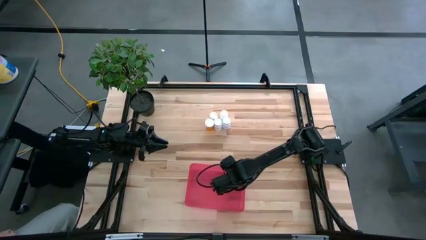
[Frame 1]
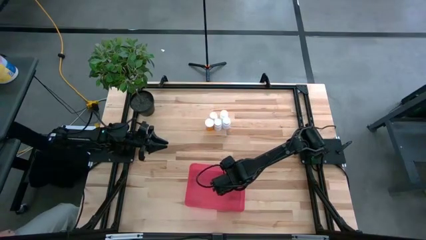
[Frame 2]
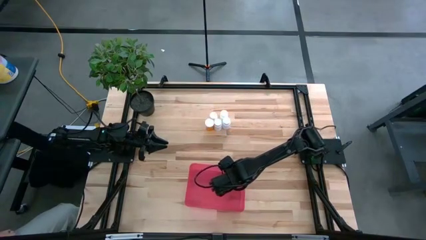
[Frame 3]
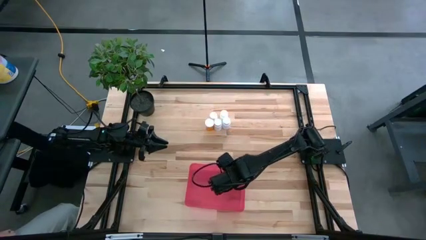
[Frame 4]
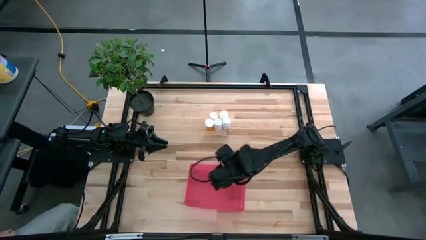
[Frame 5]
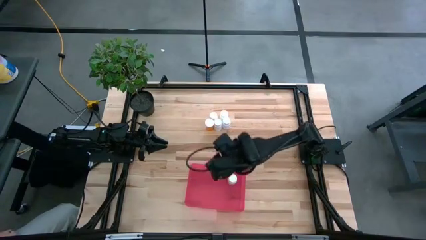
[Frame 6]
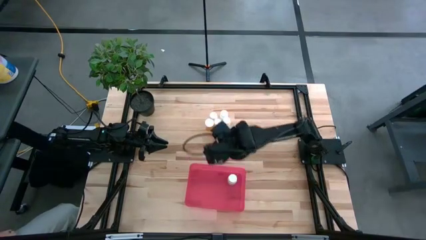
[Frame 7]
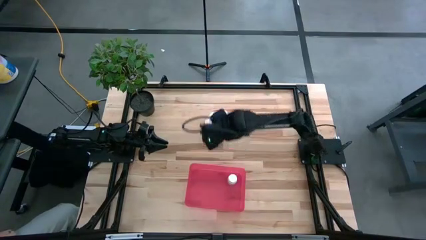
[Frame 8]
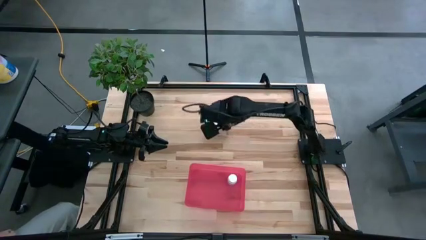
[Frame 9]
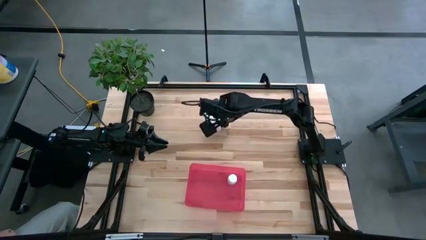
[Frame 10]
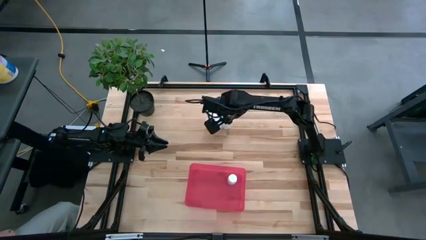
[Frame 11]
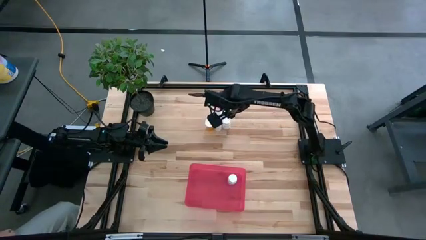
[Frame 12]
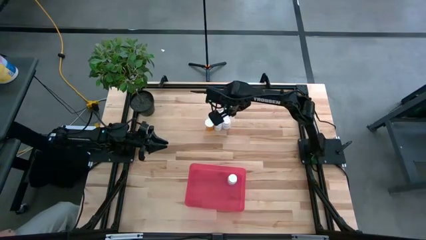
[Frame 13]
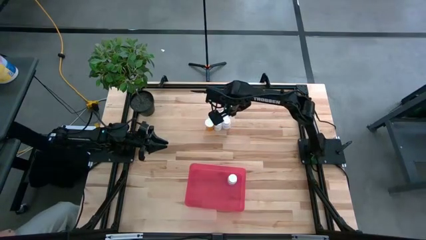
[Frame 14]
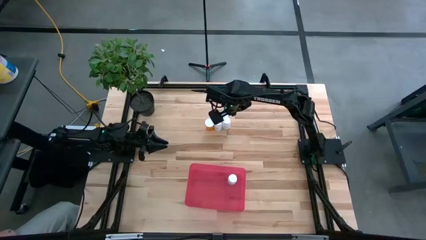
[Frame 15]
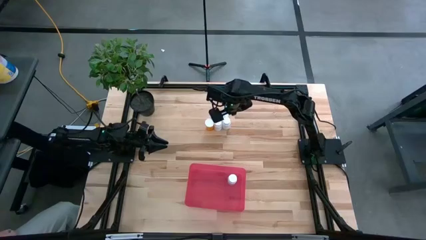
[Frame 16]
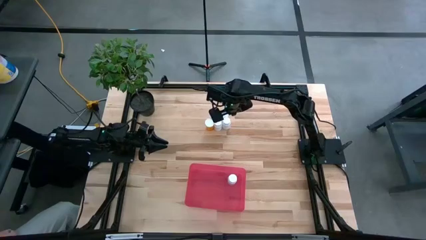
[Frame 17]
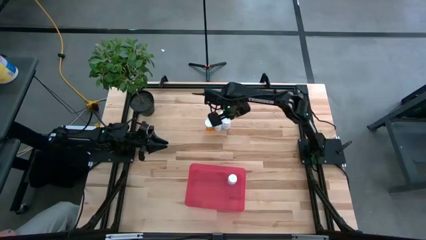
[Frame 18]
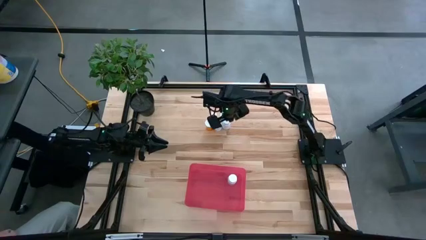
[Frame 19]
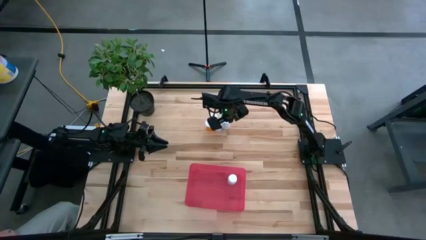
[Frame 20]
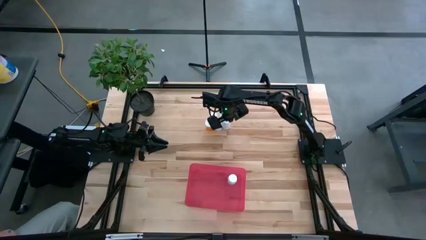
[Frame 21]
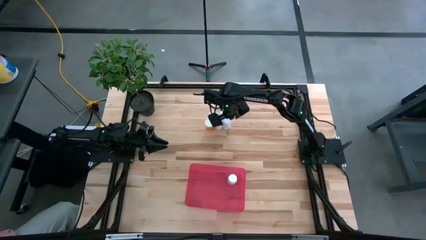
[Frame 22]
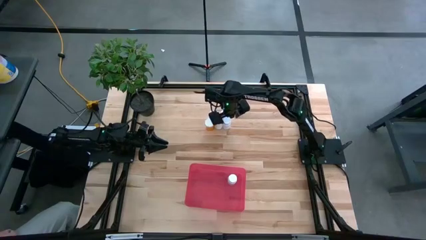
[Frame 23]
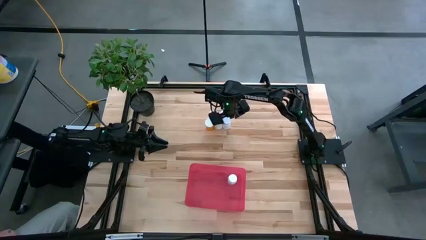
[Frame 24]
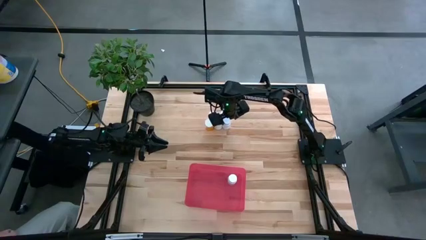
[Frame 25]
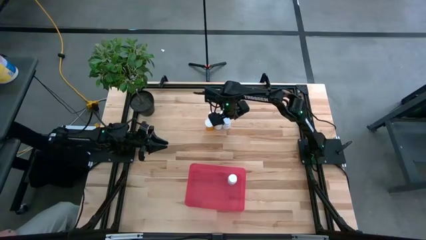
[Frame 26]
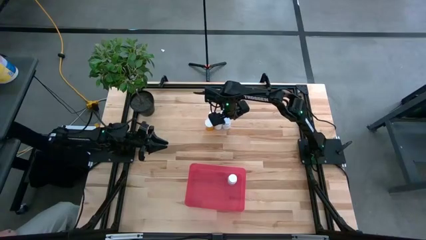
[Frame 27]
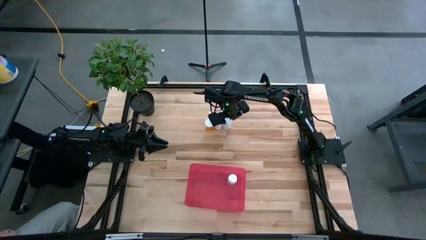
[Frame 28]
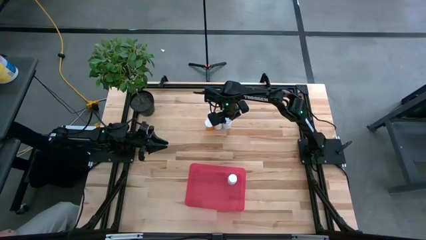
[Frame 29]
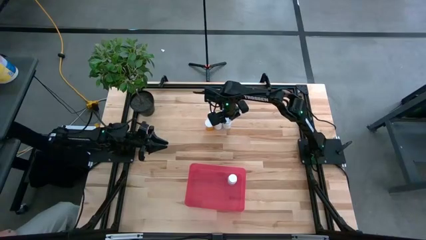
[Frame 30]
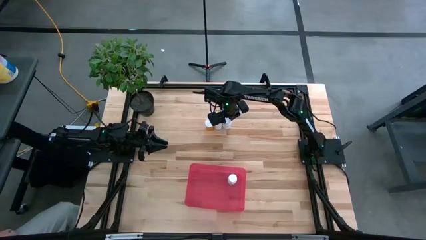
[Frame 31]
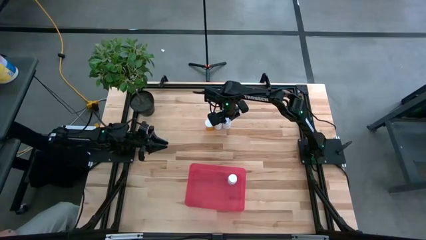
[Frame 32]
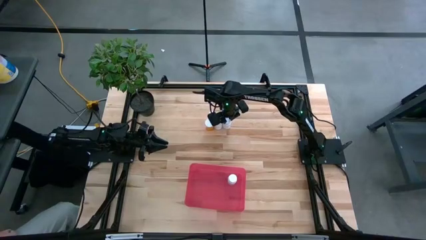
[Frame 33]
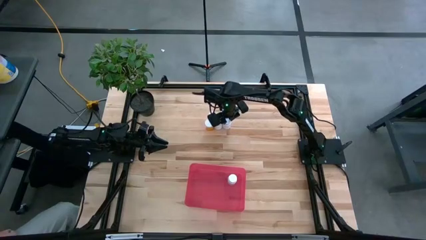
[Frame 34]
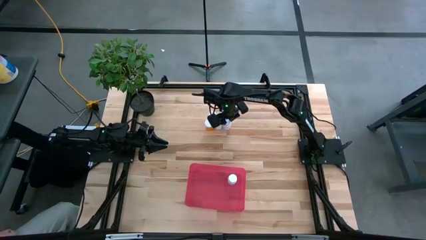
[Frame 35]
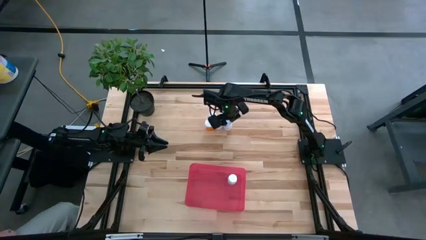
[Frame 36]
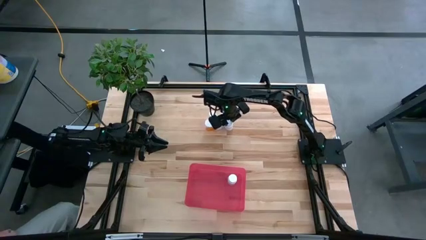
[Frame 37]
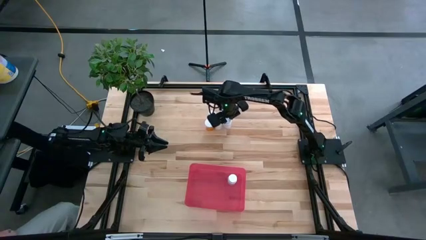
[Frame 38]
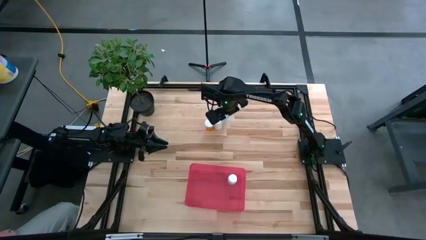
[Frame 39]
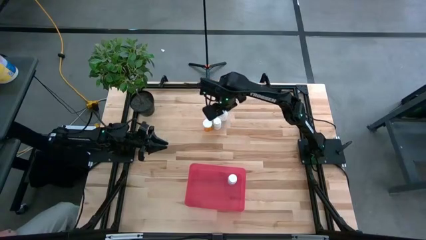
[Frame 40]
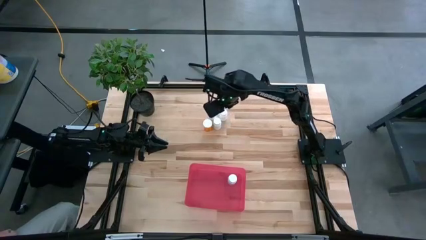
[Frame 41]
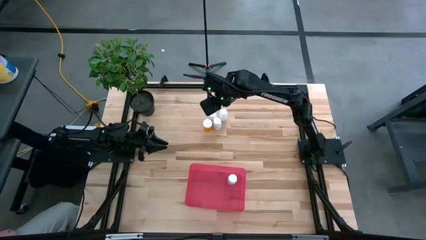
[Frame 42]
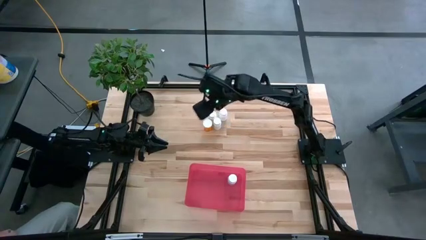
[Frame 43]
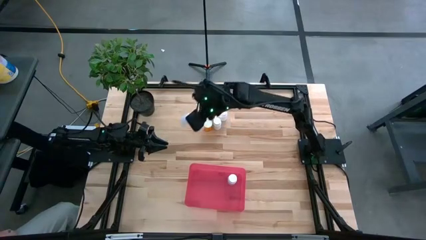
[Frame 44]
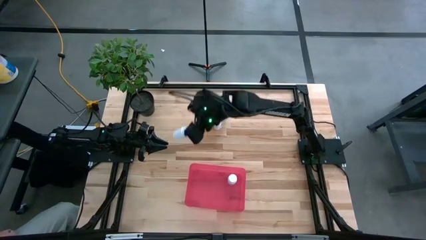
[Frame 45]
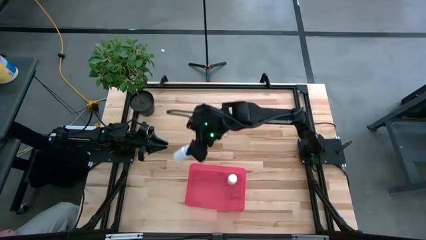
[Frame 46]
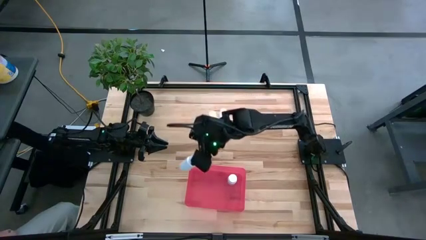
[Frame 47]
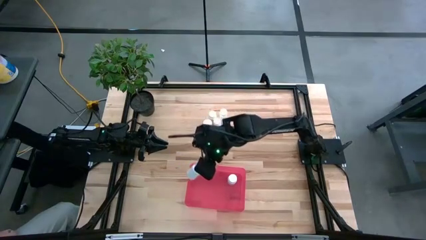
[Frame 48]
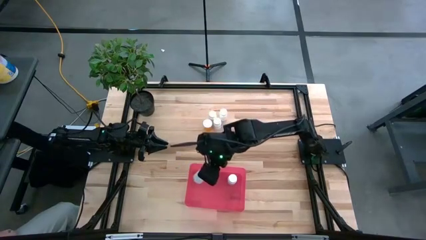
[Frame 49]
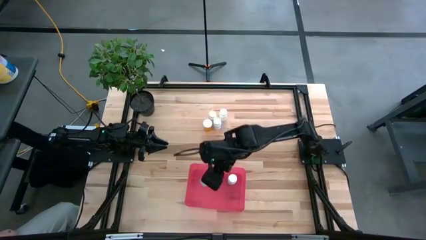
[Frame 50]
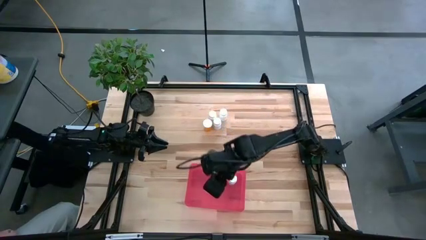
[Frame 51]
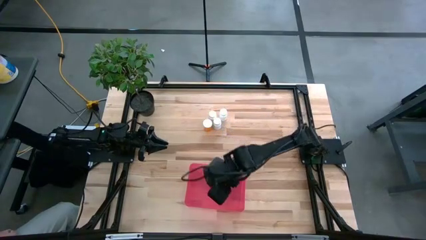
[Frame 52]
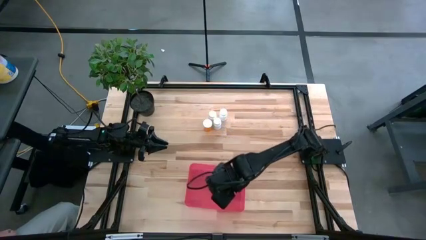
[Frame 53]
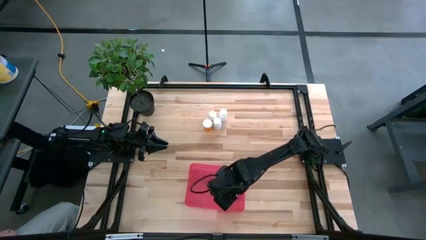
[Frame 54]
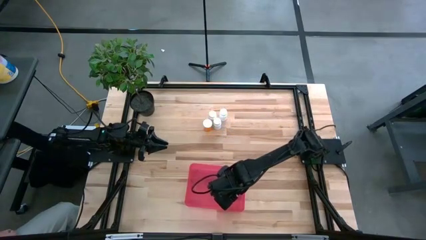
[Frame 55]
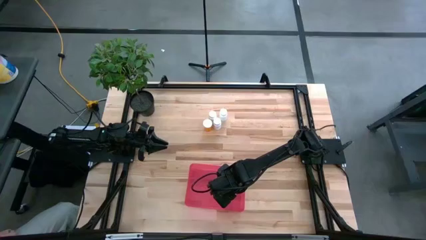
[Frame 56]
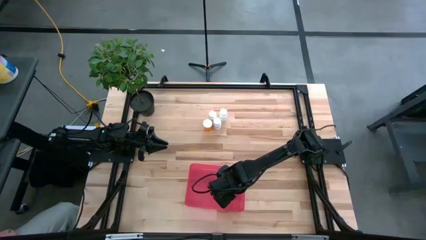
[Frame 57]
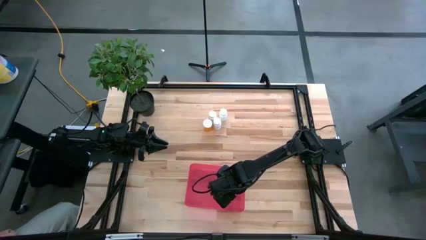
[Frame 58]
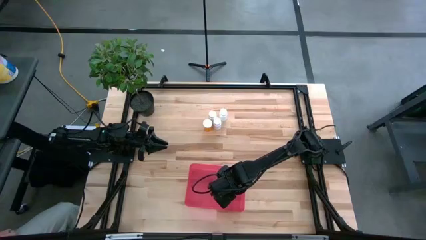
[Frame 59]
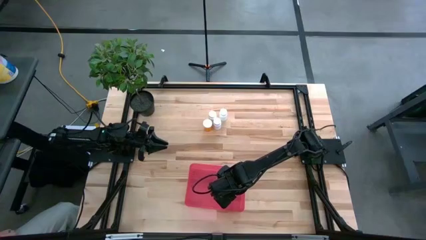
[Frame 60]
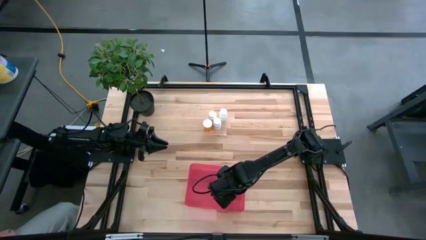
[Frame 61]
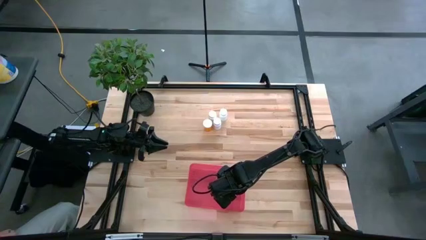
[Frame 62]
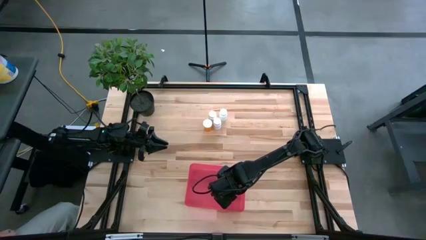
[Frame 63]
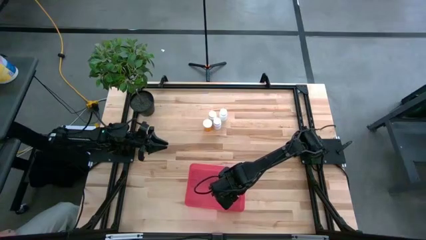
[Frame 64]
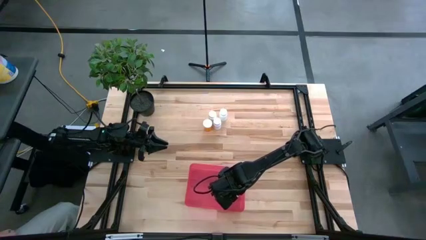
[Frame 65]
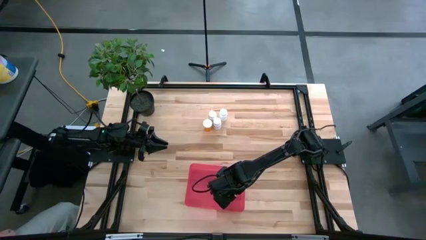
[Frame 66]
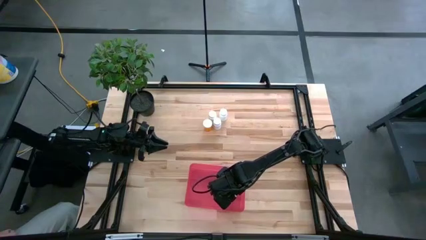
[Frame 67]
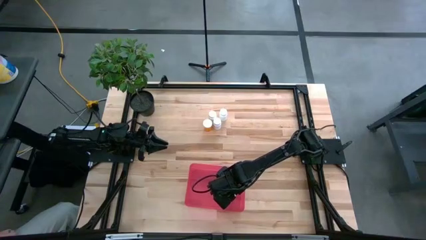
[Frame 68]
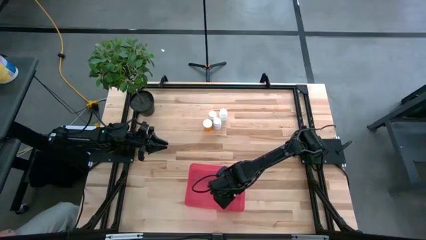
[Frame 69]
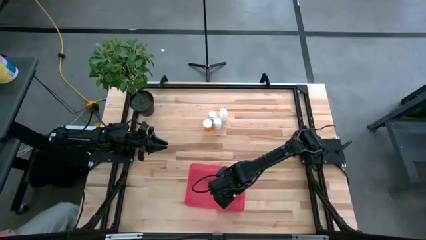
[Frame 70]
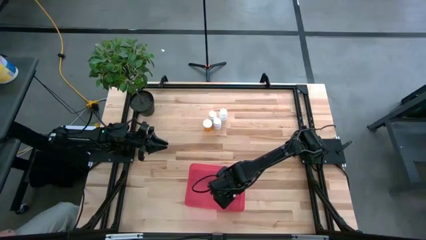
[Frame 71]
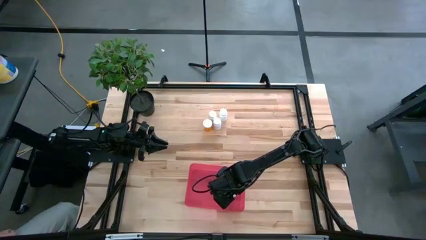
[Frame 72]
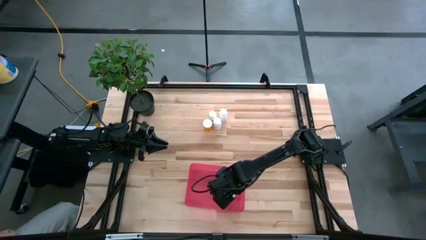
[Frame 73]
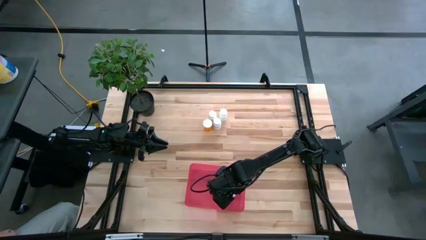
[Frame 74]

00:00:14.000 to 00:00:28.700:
Task: Pick and place pill bottles into a basket
Put the white pill bottle into the red bin
